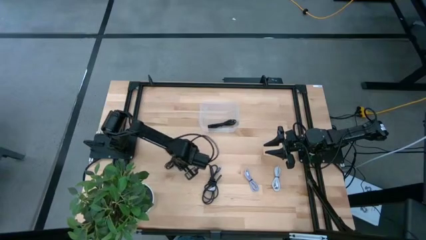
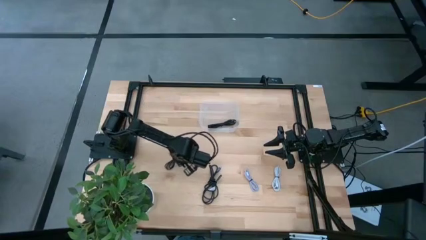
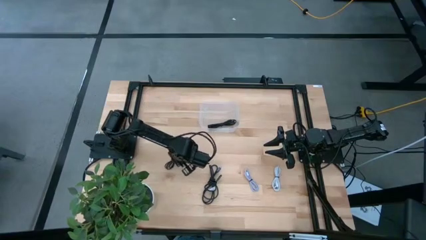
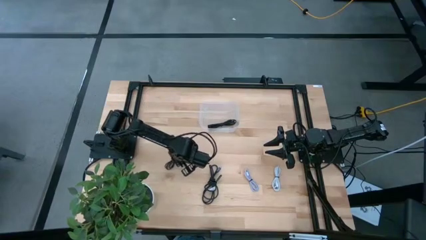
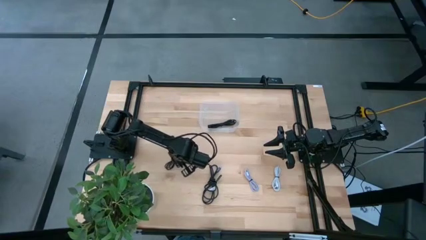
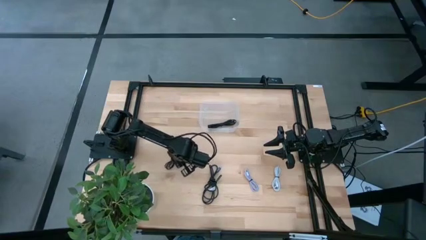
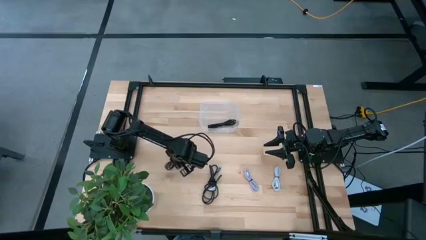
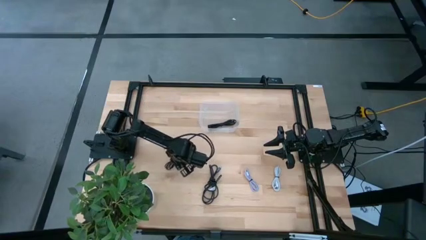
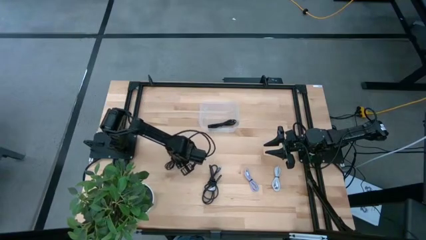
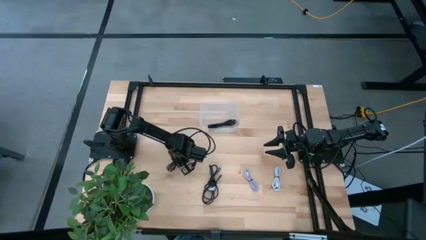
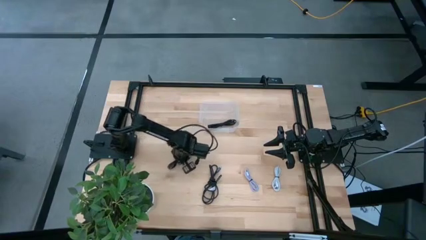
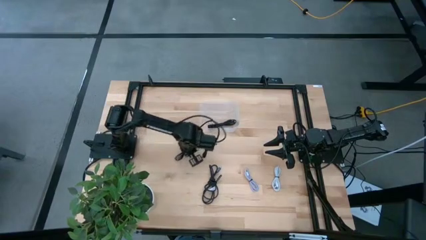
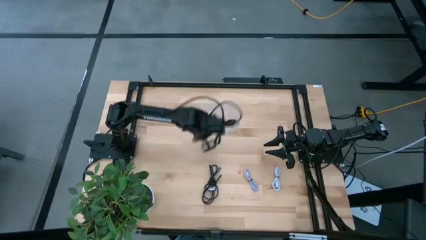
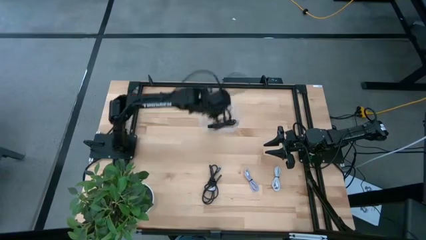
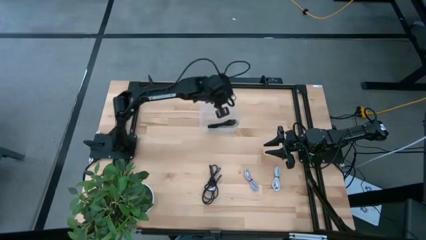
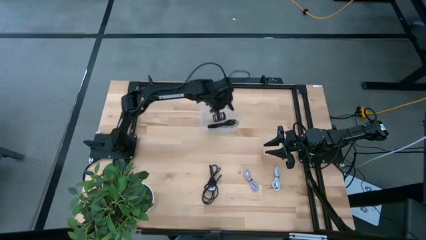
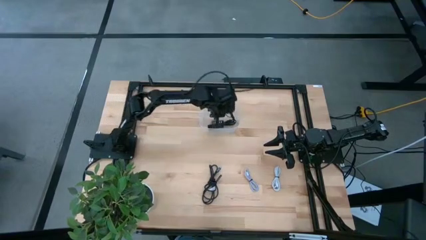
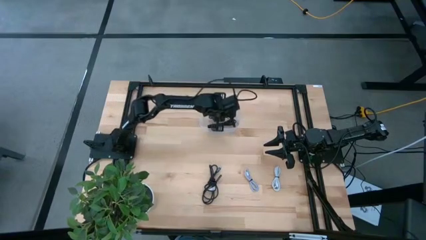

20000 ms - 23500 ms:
Task: Pick and place USB-C Cables
Put the top black charger cable into the transparent bin

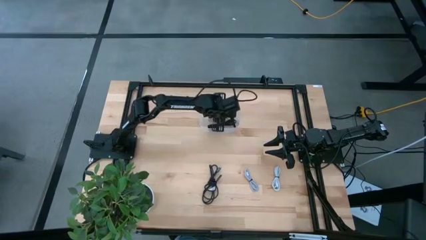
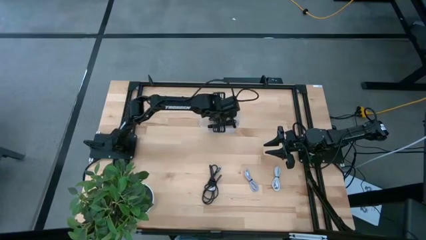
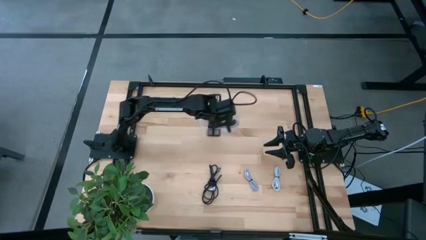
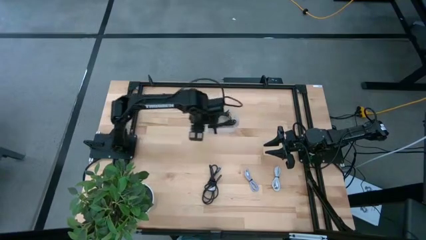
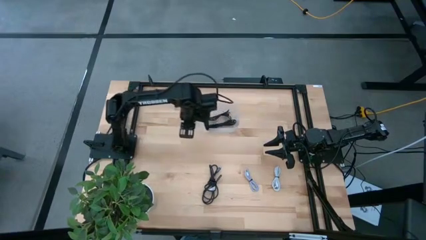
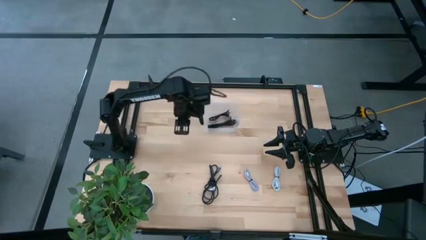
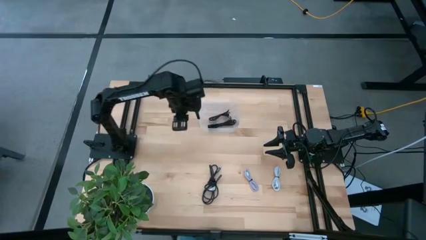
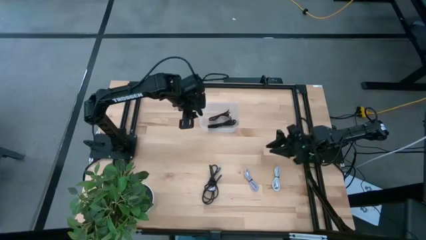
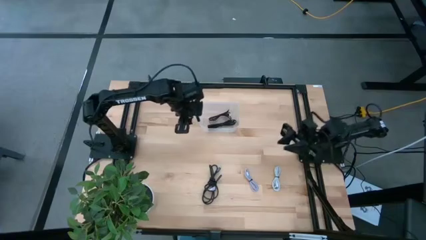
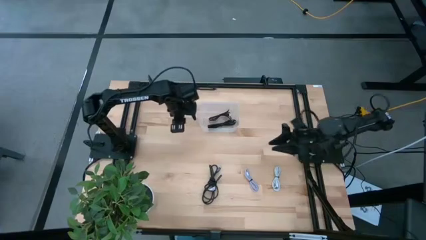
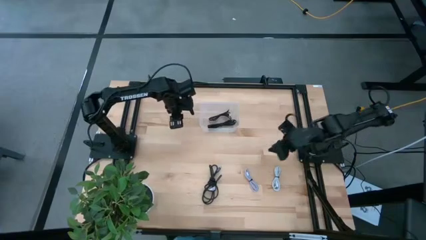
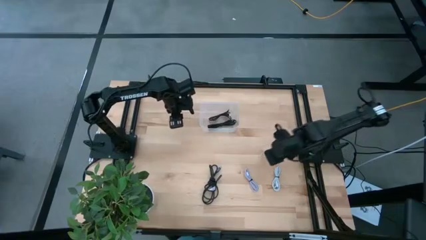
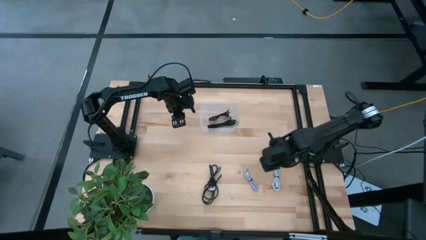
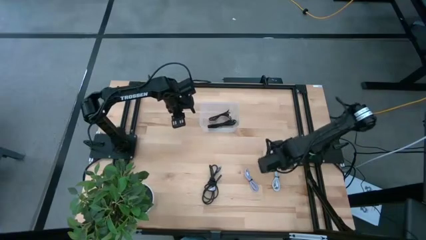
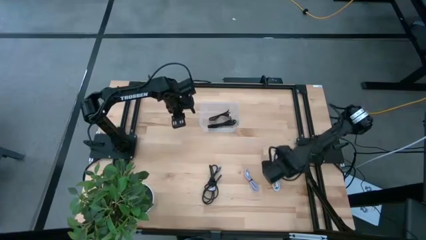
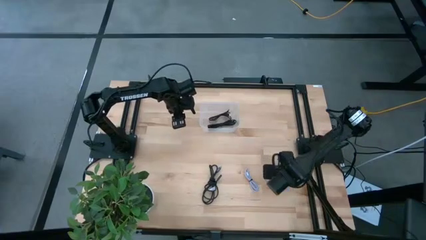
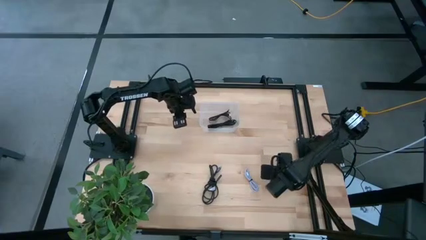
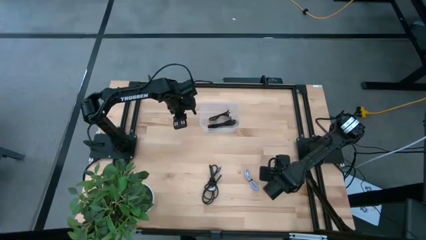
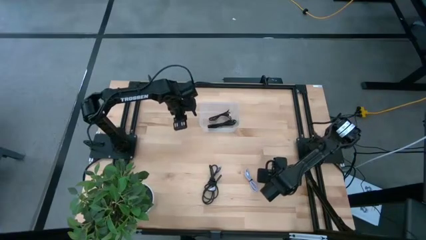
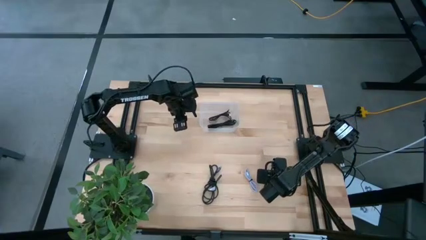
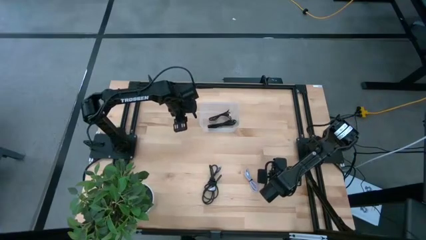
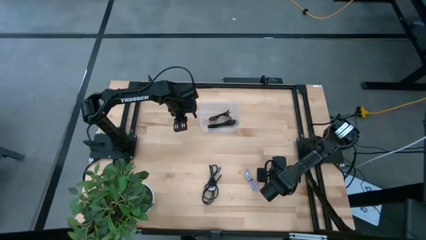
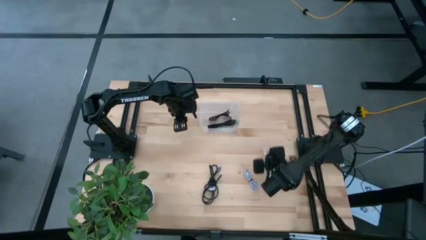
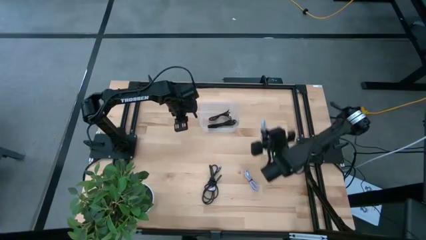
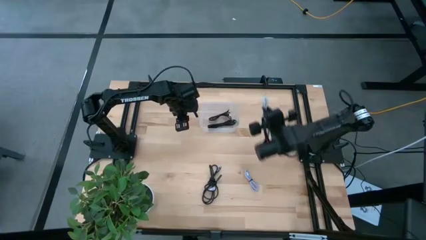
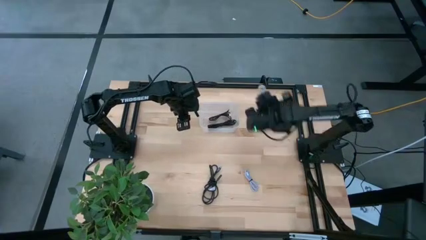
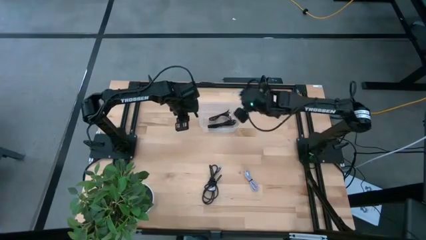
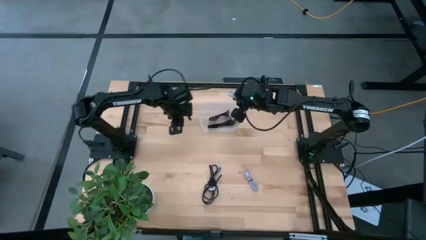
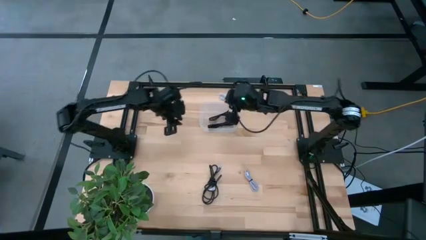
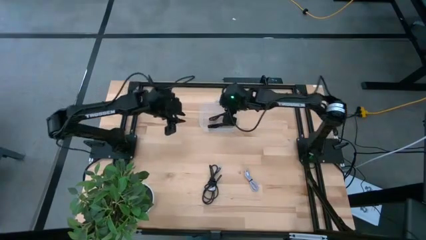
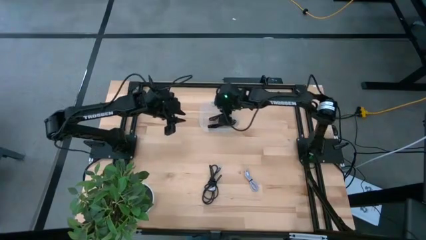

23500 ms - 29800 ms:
Put the the white charger cable into the transparent bin

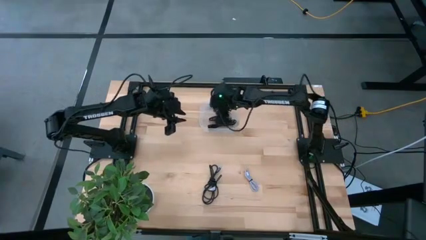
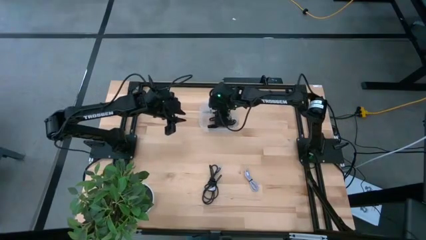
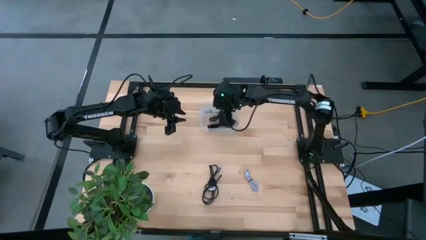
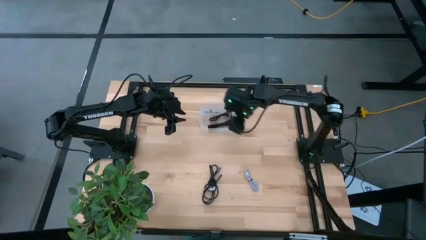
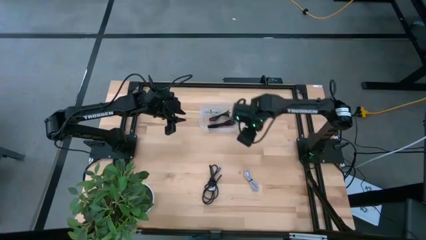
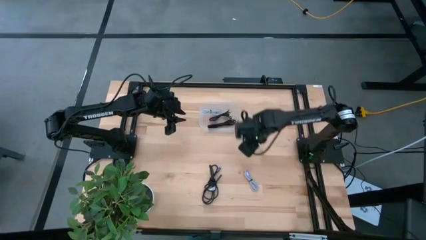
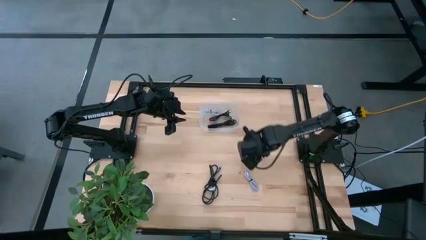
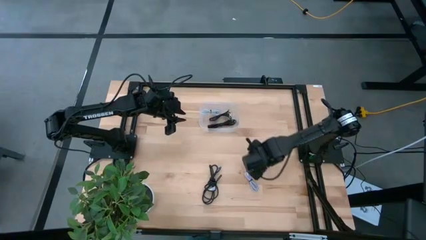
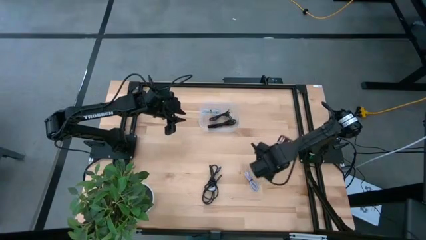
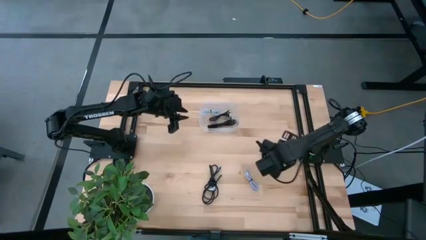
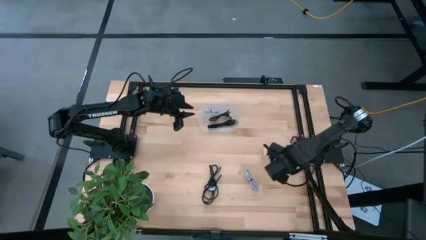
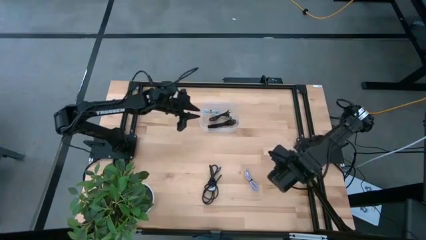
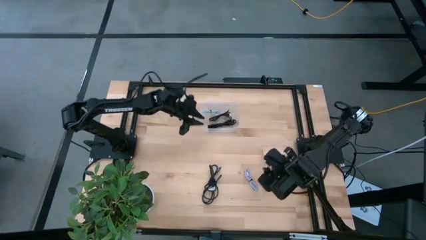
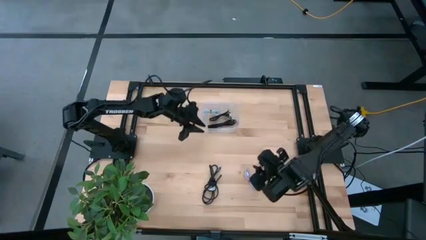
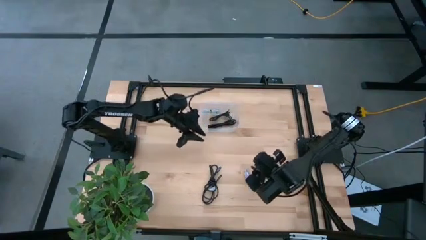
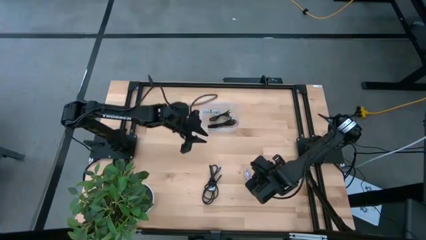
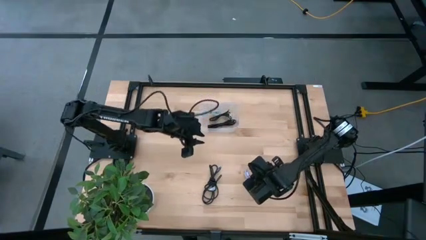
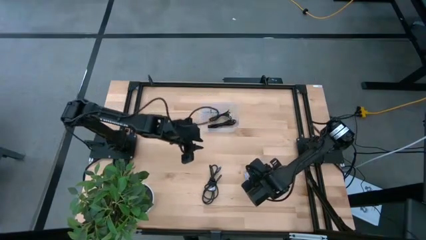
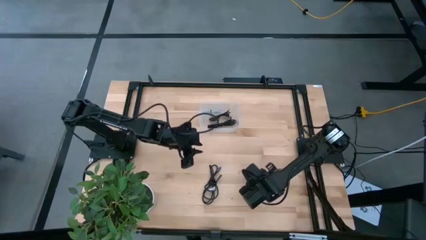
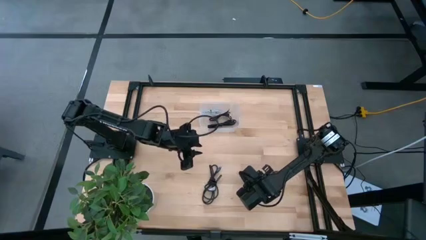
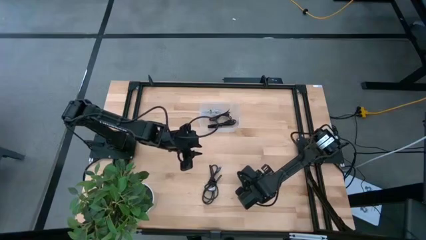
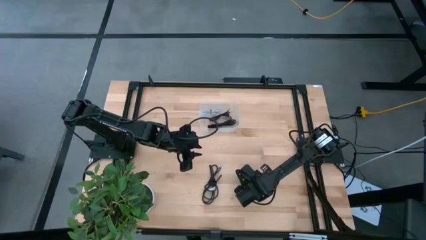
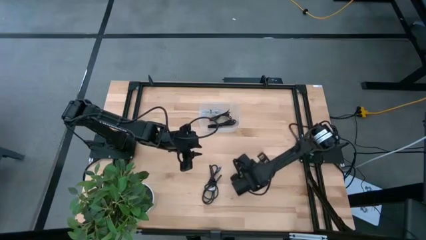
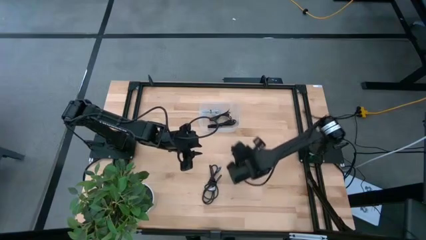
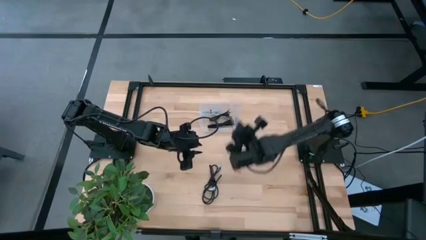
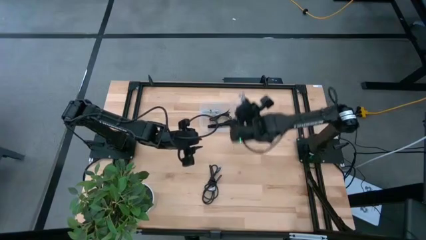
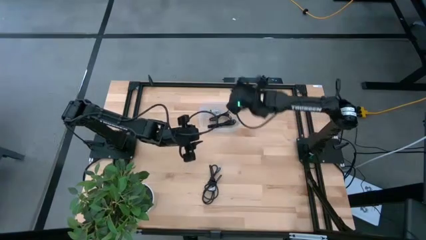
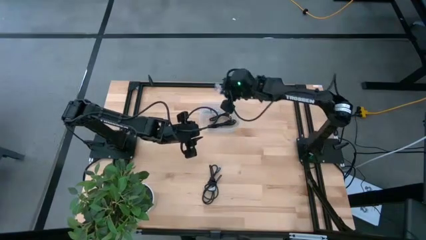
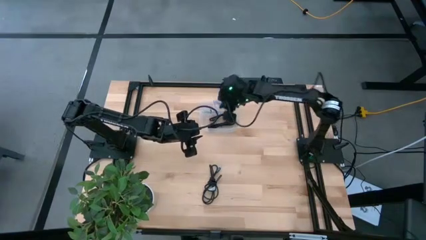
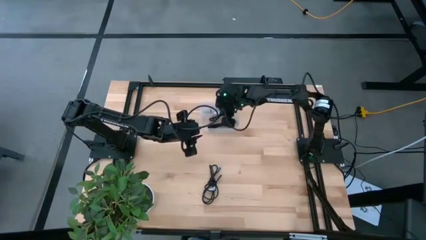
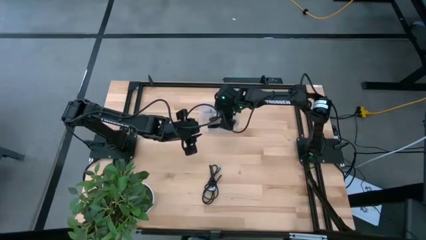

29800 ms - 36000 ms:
Put the the gray charger cable into the transparent bin
